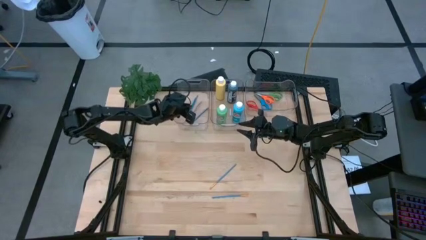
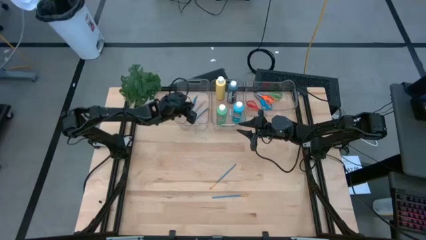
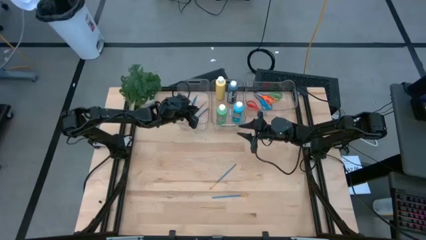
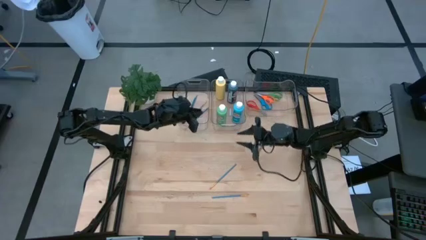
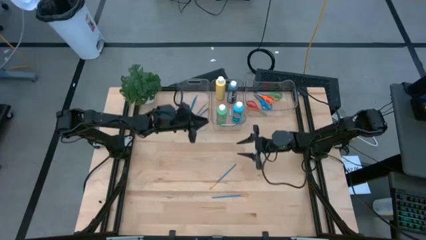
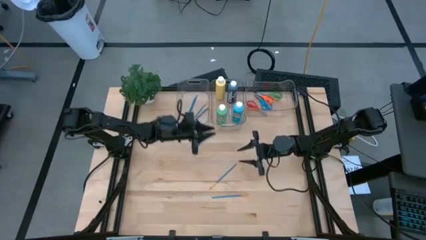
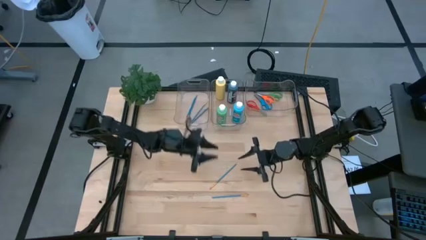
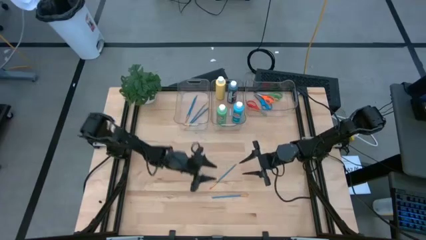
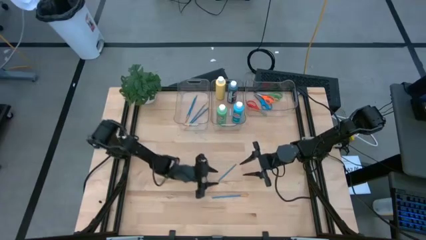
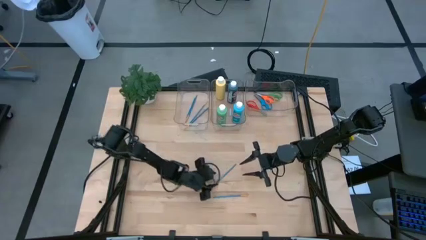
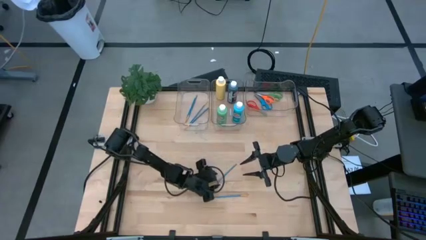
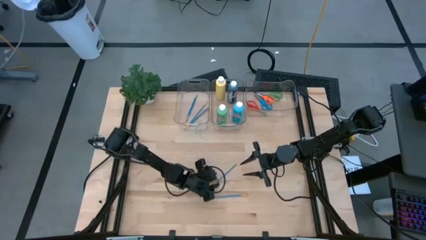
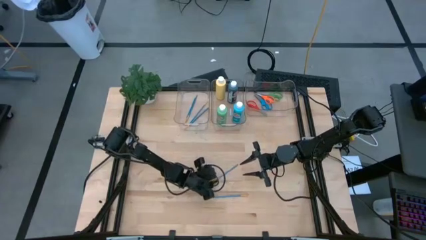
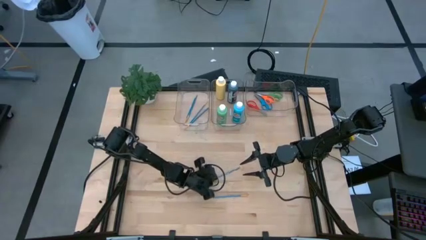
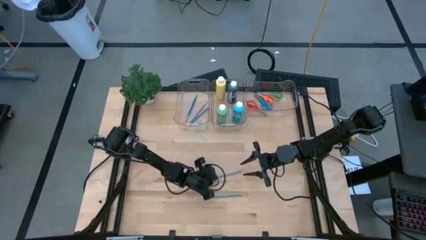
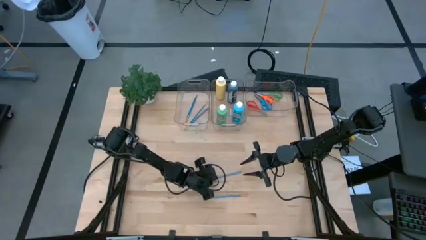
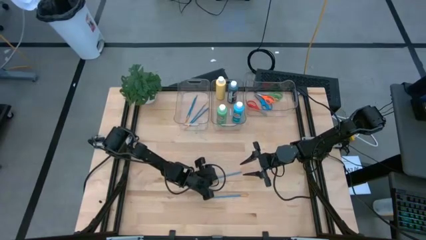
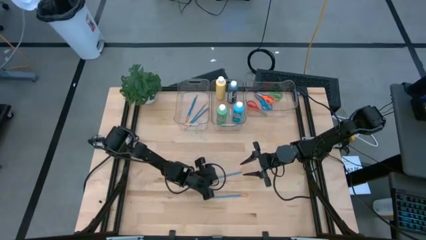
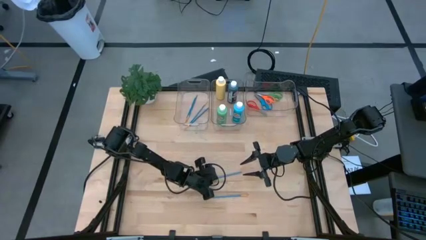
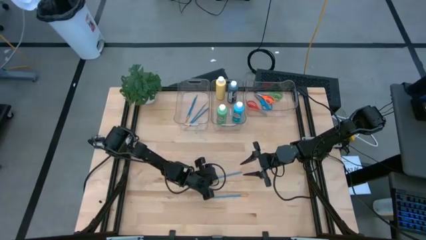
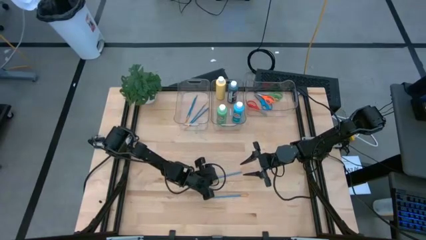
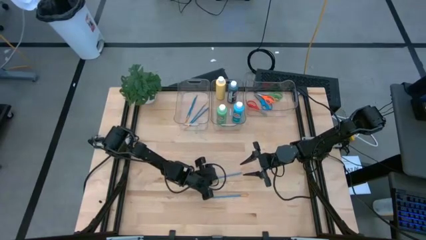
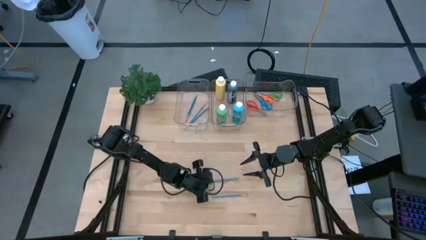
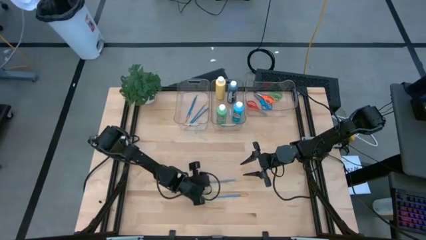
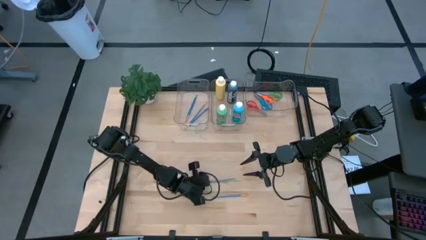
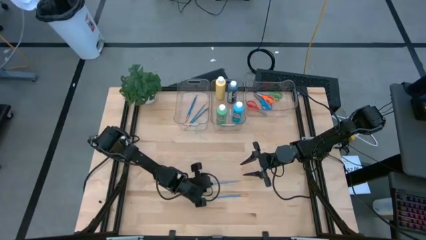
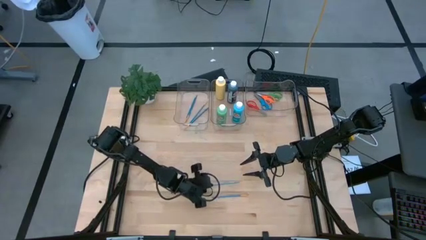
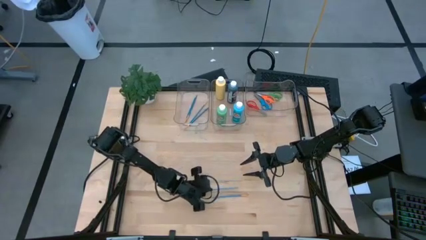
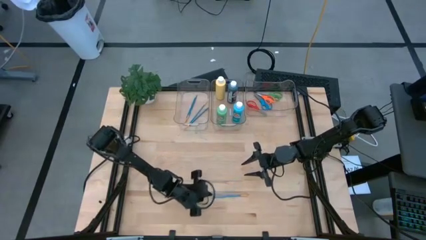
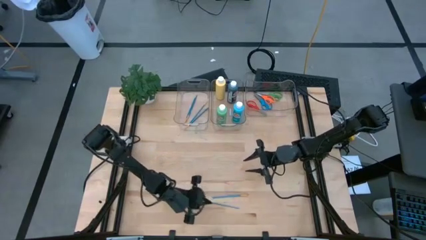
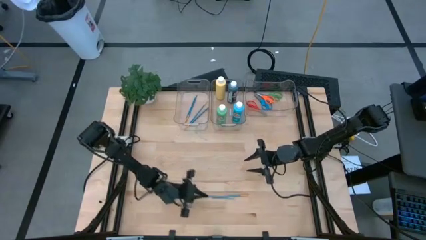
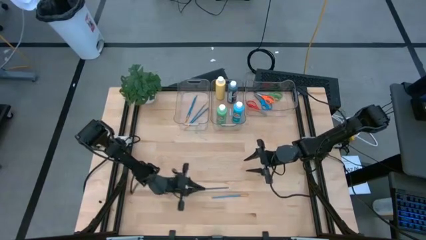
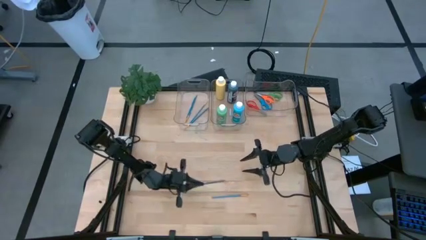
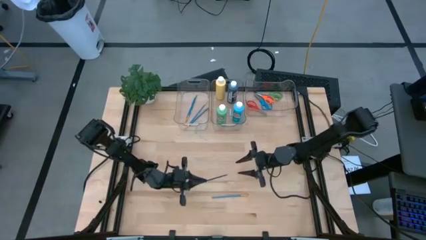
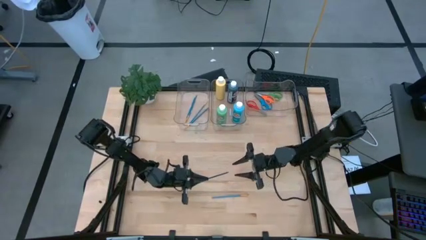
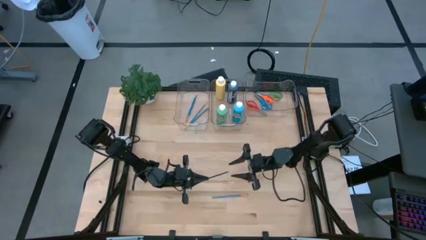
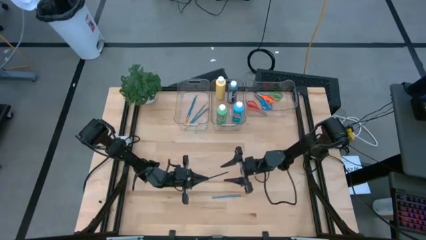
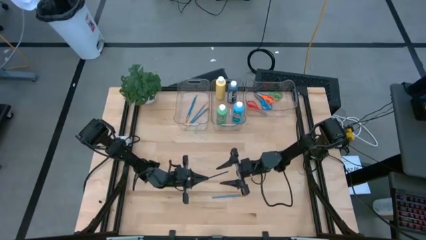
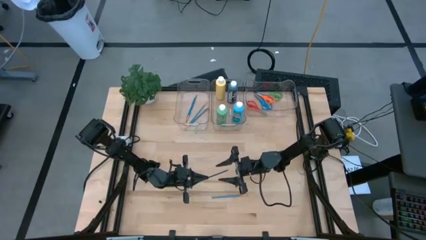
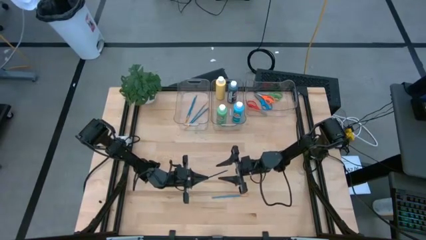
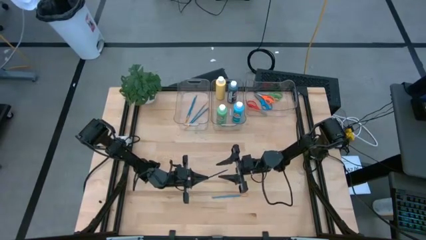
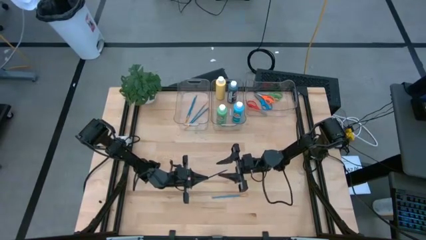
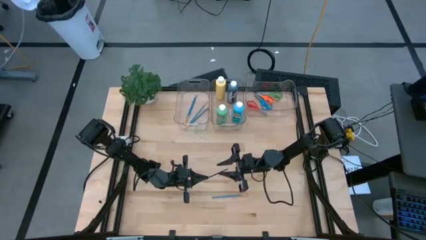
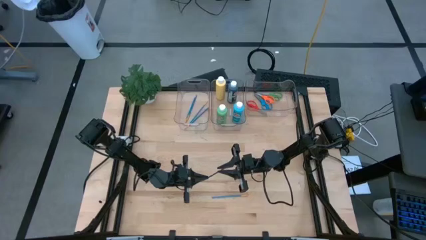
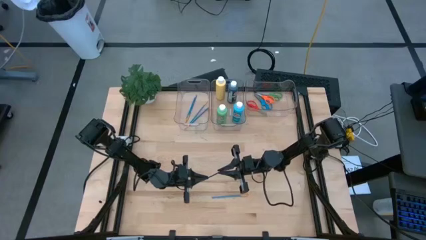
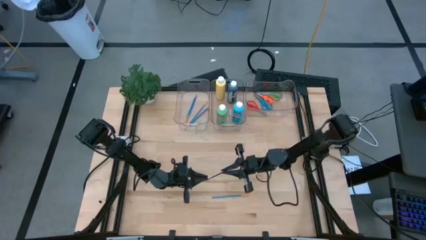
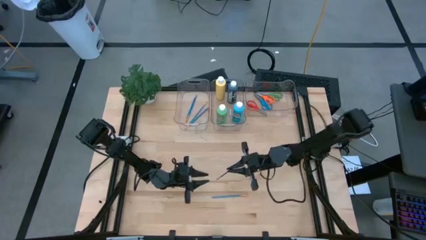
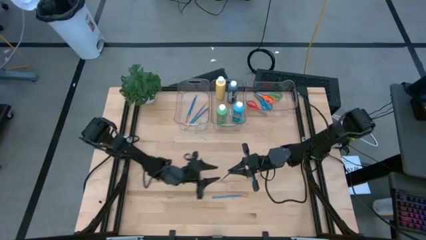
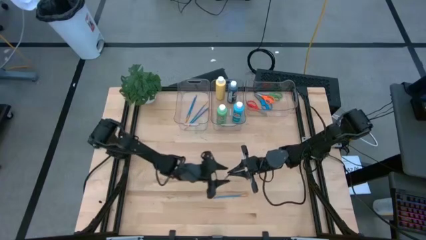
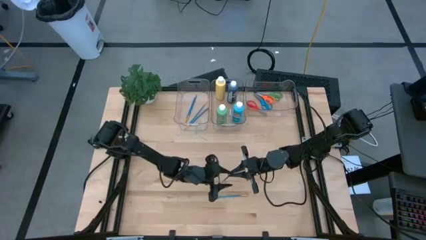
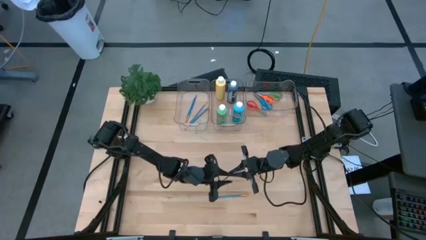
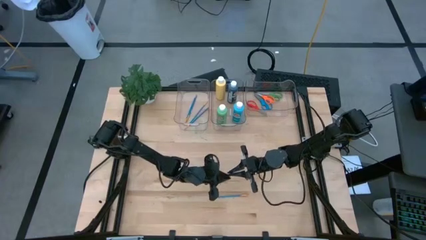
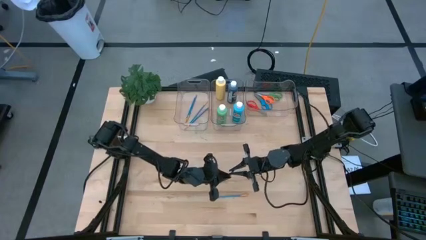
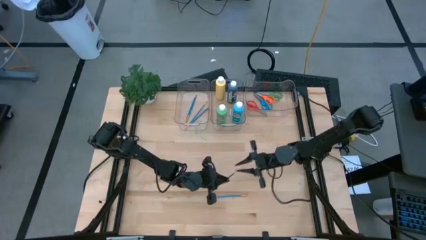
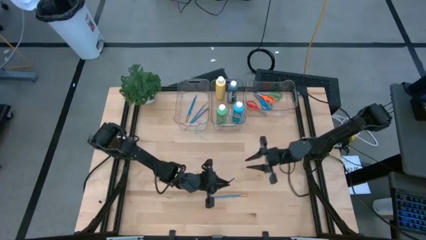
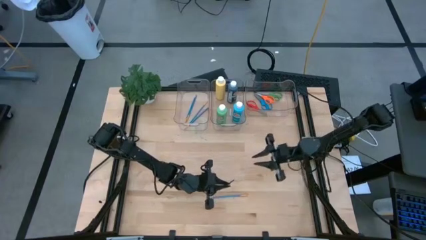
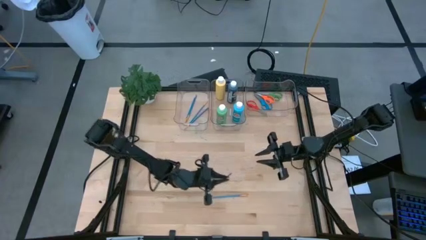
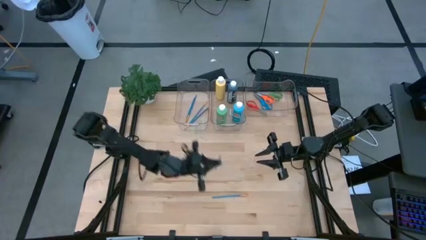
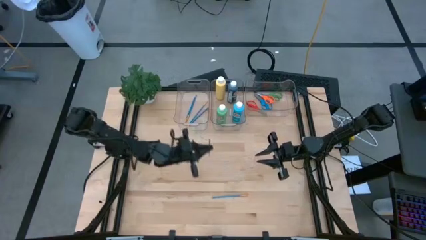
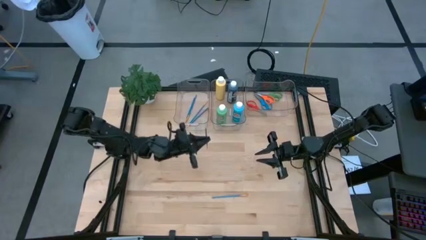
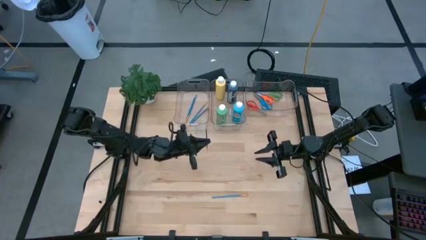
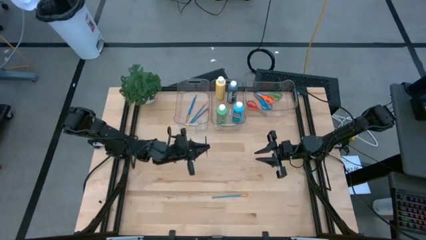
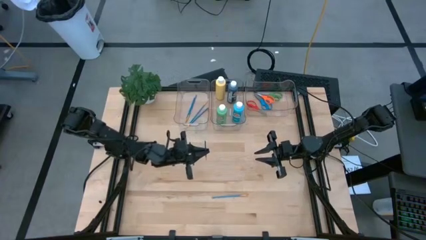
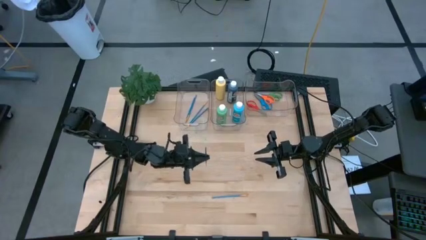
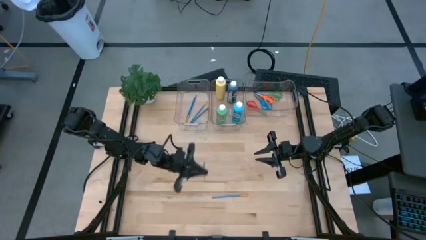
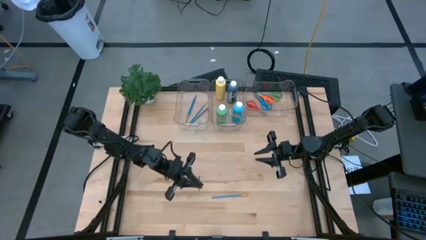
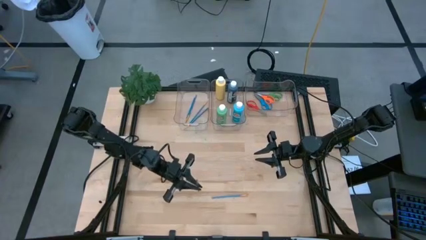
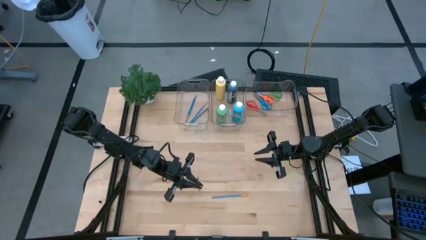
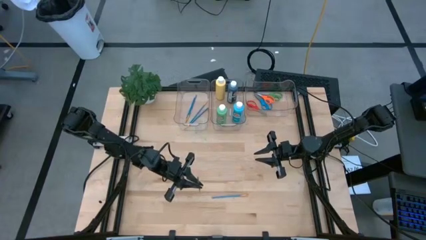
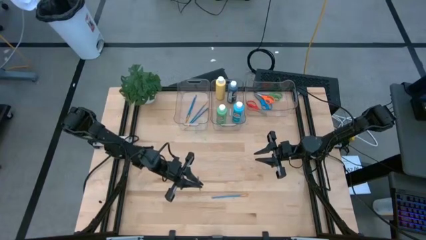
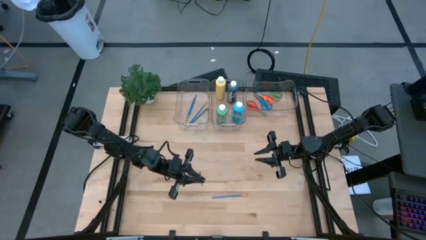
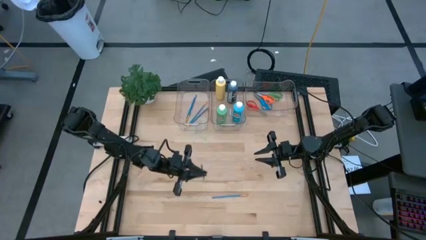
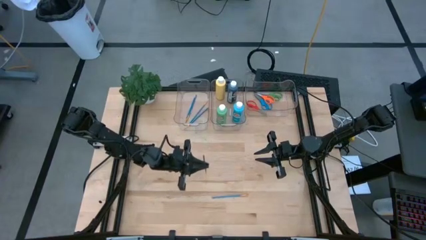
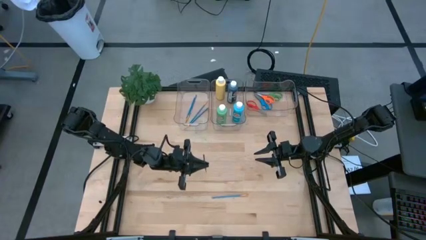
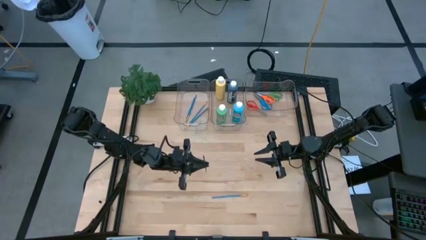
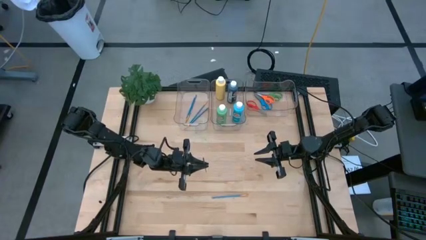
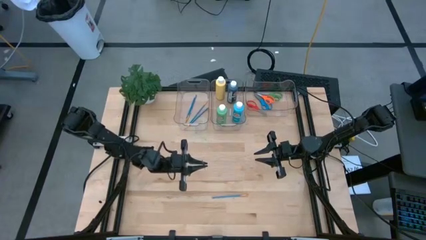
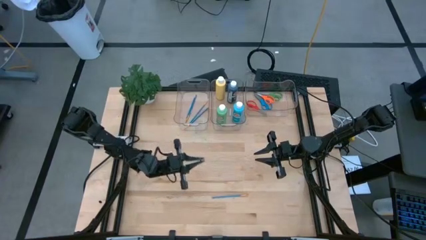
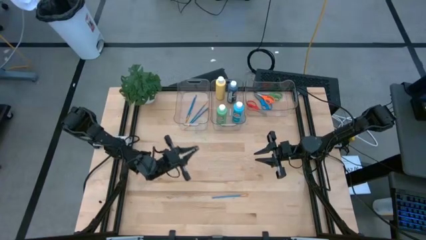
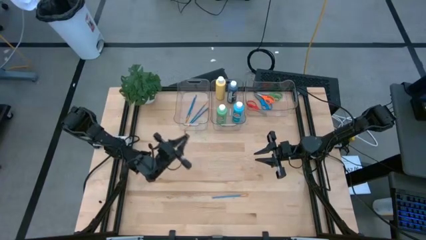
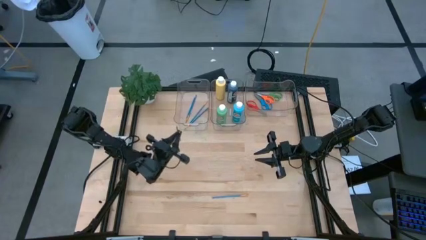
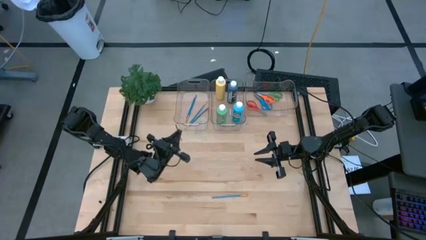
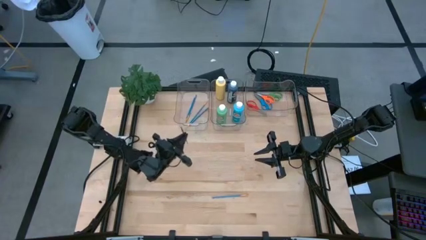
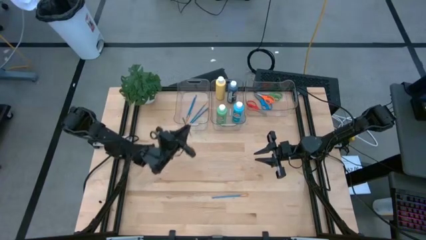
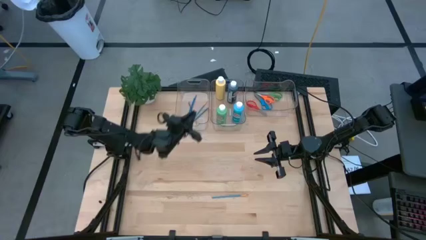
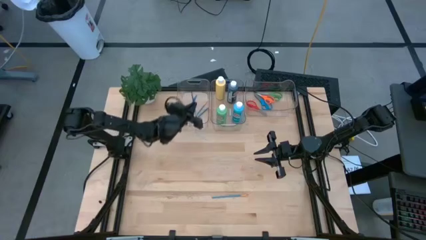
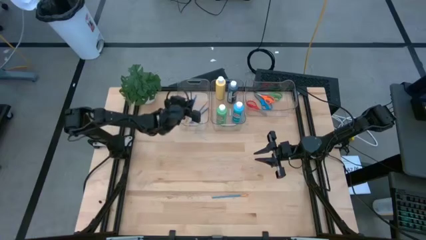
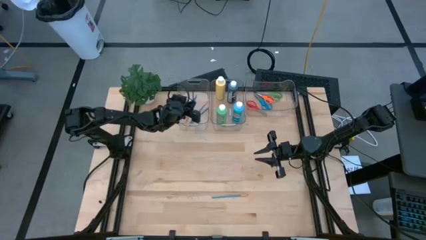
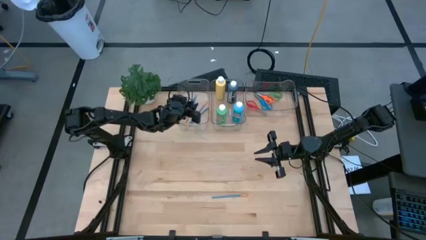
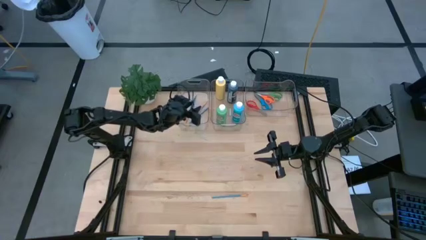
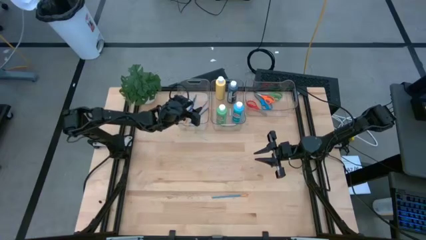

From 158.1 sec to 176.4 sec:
Task: Pick & Place Paint Supplies
Put the blue paint brush into the left transparent bin
